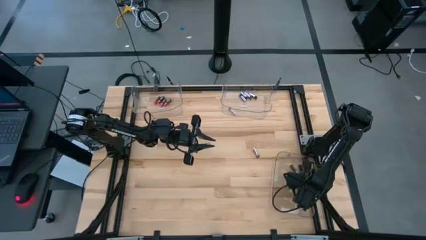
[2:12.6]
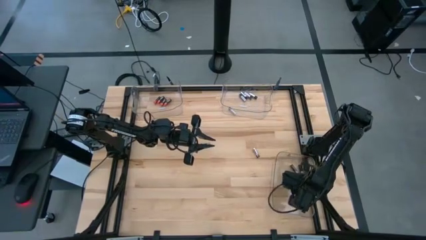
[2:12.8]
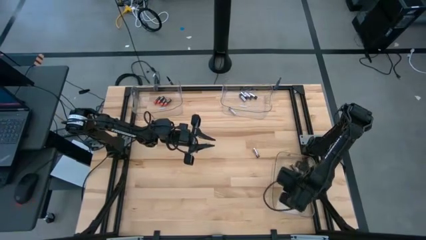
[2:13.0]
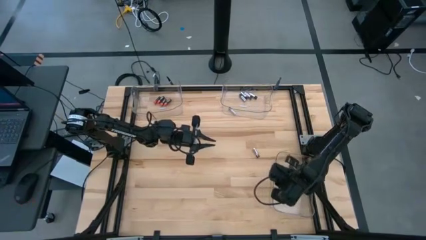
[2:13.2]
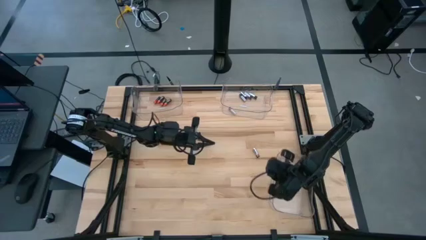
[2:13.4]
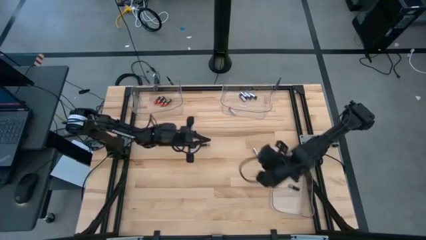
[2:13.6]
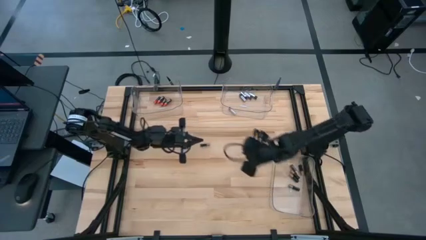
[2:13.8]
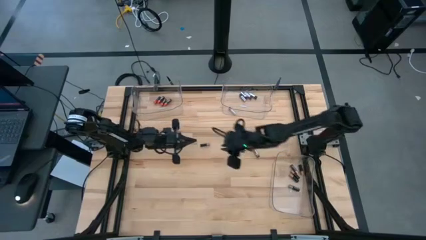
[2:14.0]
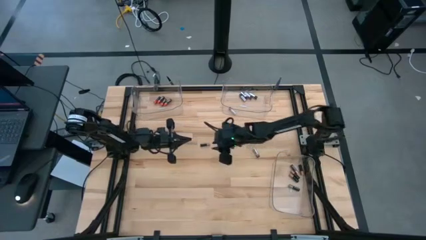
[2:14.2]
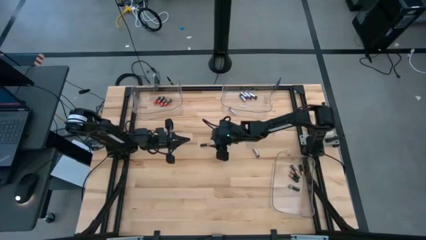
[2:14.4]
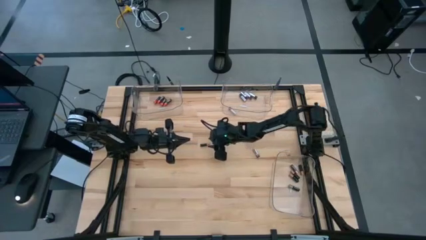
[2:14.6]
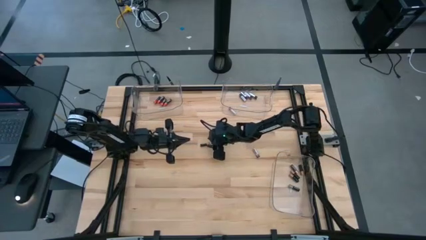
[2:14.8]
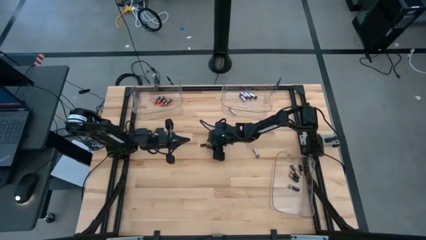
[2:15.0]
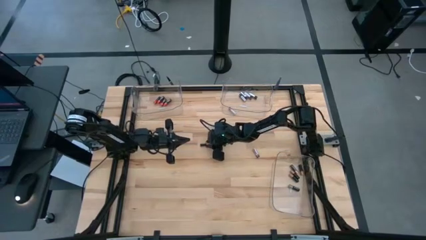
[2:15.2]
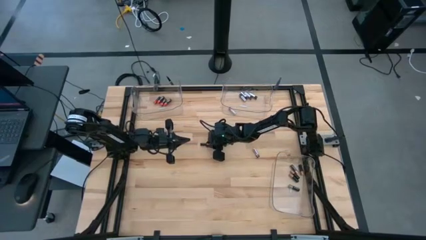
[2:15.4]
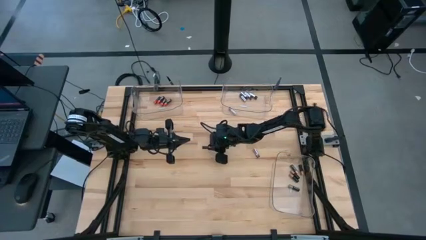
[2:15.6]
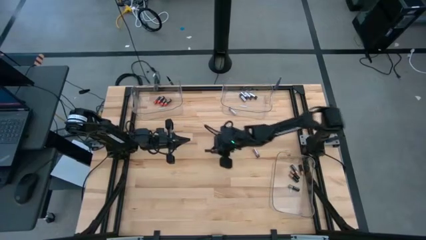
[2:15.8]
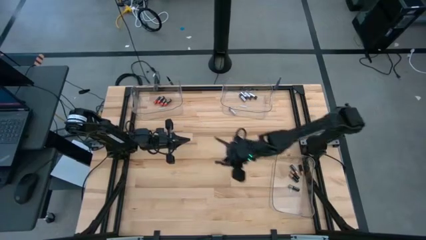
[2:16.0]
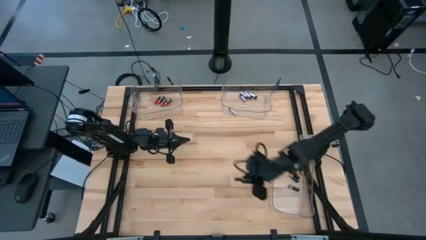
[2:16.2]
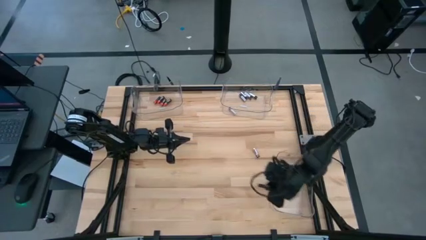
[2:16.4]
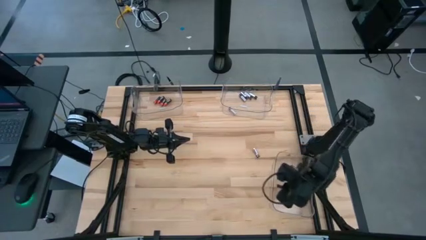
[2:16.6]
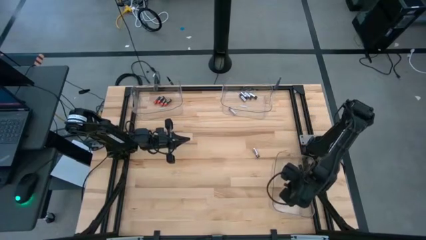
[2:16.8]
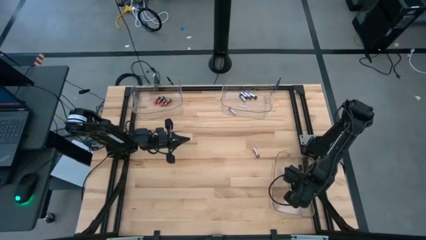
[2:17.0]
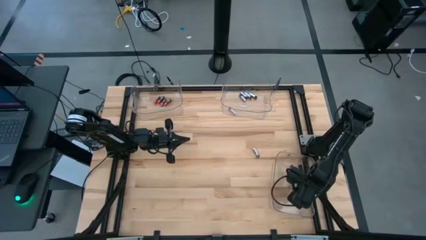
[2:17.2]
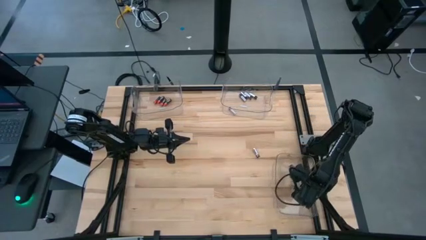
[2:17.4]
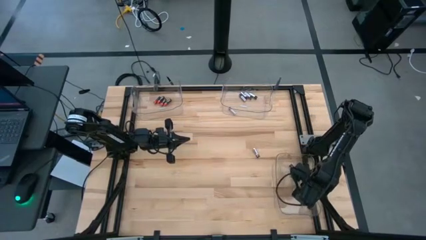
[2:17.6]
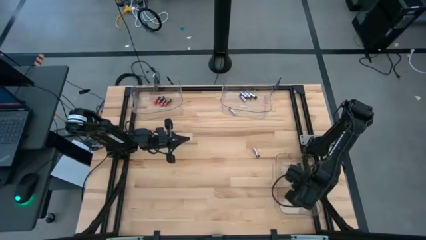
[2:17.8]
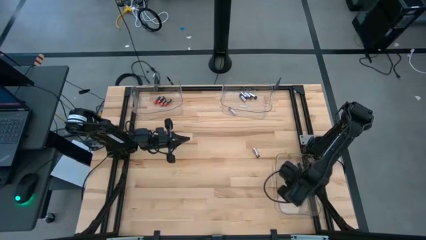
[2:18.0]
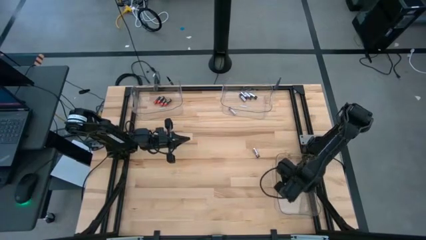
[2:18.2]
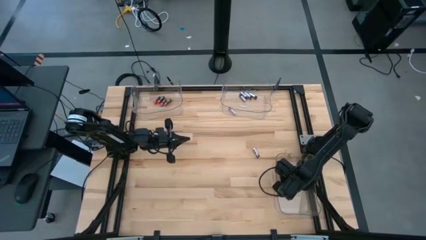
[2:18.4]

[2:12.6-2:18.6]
Task: Sort batteries
Put the brown battery into the bottom right transparent bin

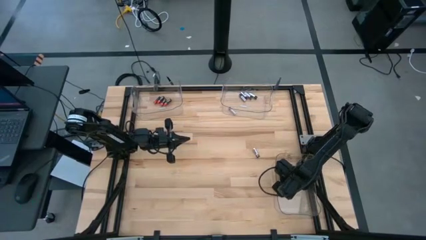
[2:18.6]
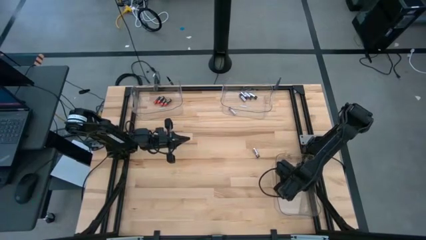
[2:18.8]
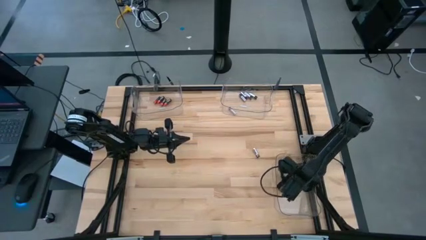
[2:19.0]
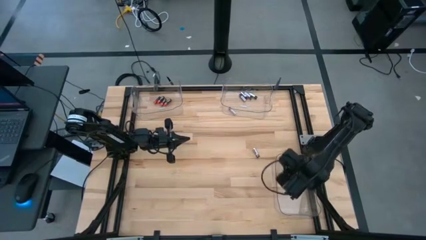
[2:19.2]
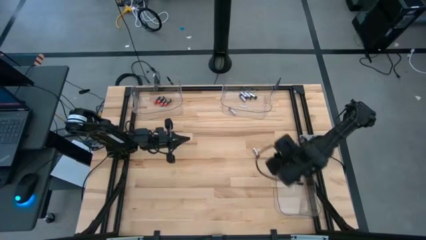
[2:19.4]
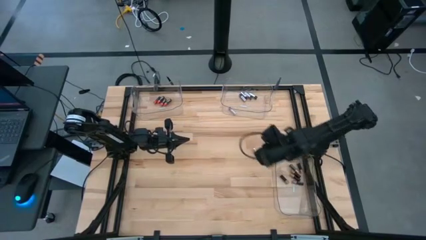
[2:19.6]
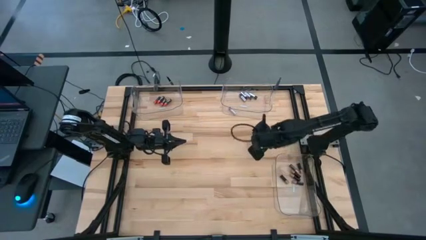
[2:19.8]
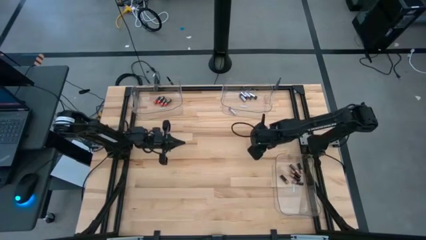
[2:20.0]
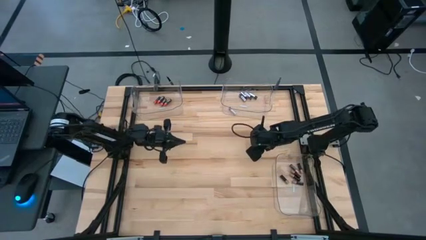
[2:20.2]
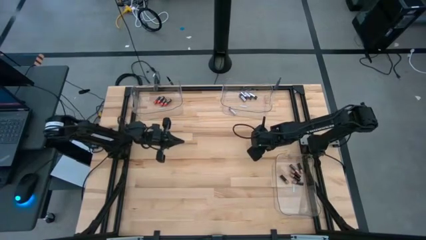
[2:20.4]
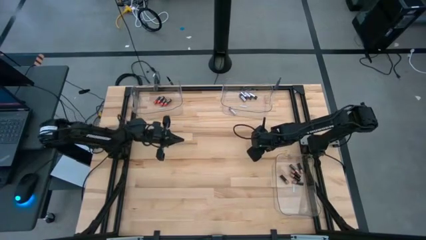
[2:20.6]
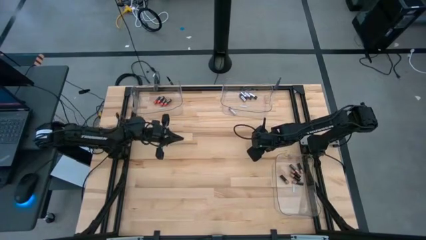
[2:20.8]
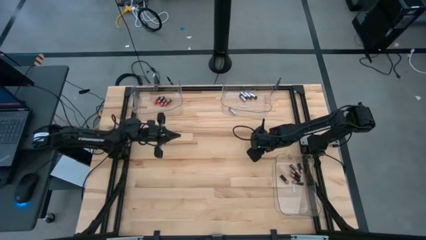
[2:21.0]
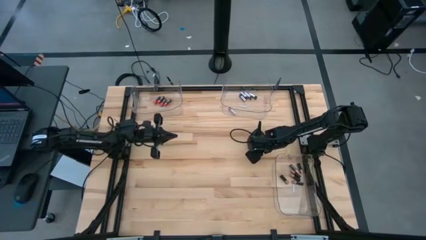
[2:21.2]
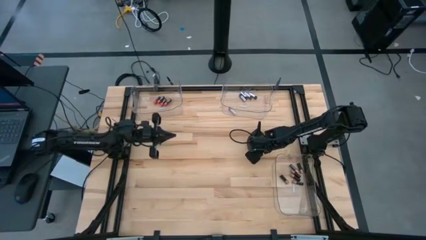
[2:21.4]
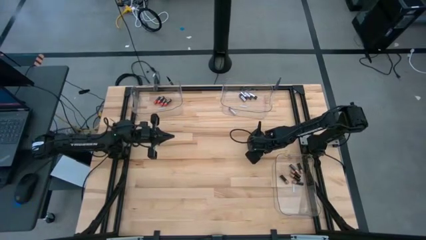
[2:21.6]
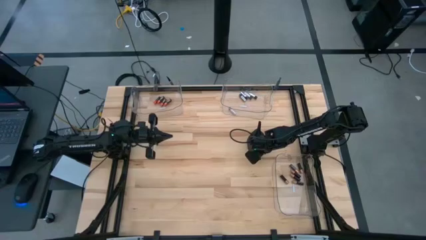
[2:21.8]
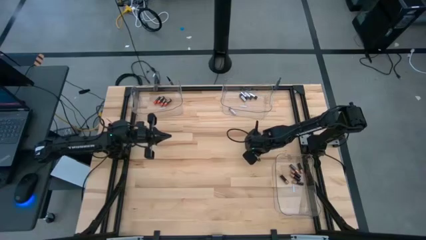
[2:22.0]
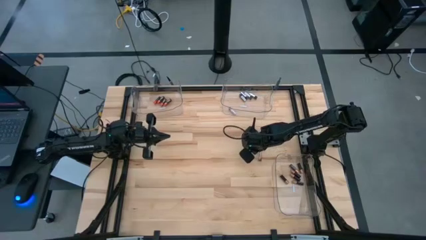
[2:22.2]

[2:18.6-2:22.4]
Put the silver battery into the top right transparent bin

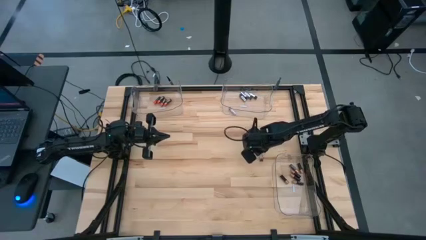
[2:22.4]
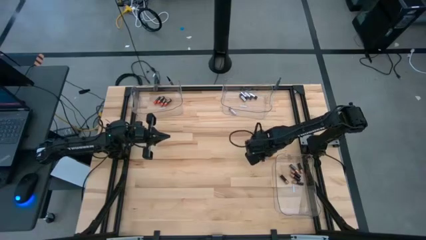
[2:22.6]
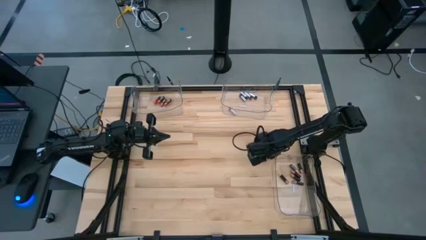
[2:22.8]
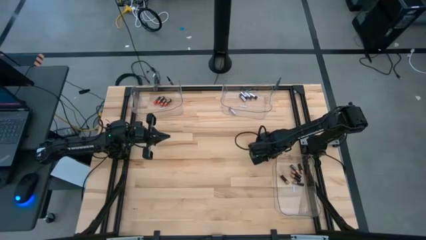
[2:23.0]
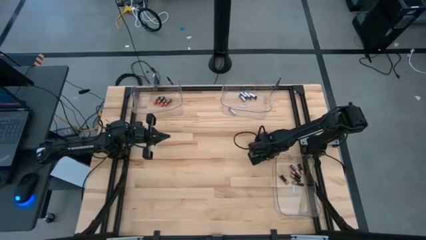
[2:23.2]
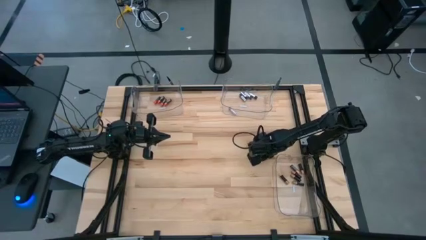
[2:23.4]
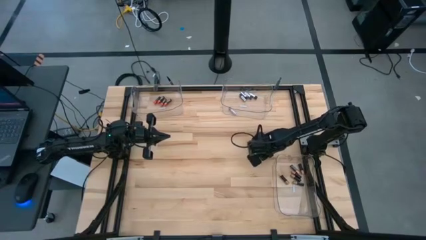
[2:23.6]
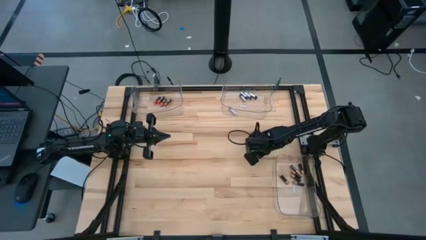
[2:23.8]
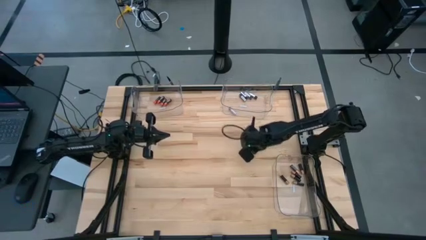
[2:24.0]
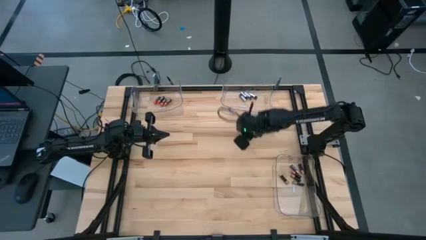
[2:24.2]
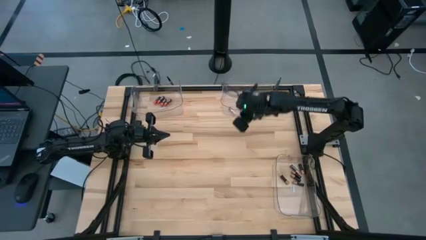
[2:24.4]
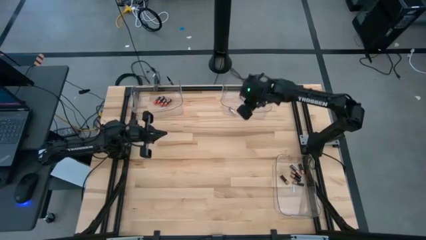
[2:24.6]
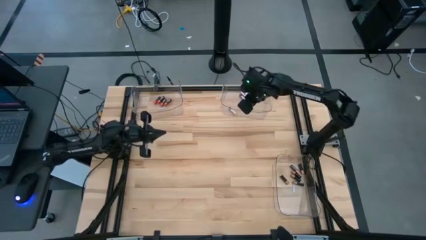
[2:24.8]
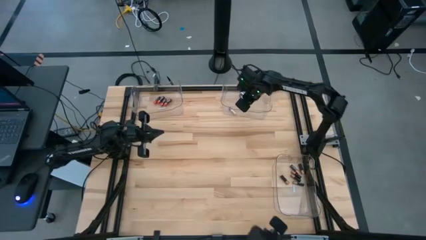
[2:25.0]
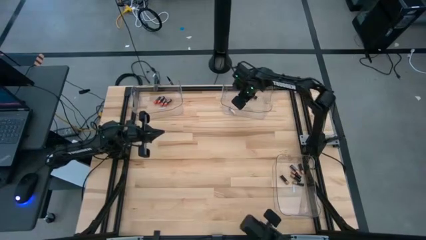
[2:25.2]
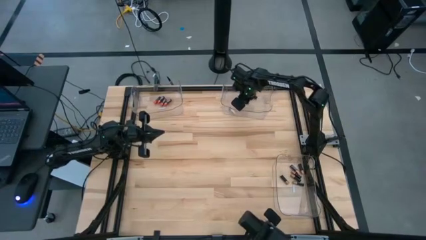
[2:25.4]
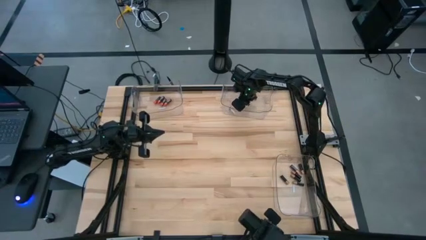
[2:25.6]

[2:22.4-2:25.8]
Put the silver battery into the top right transparent bin

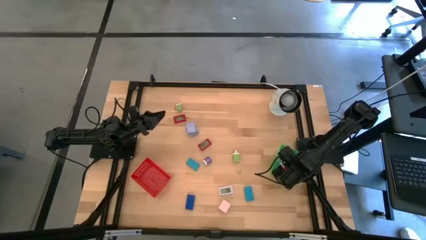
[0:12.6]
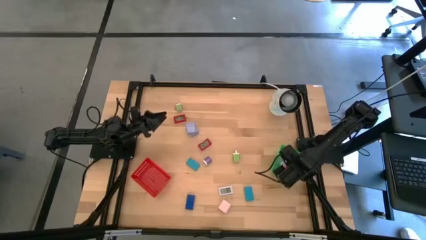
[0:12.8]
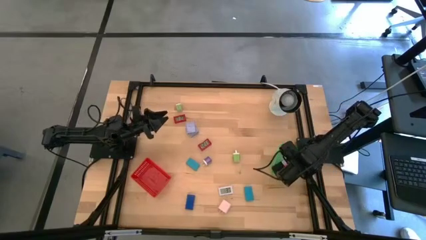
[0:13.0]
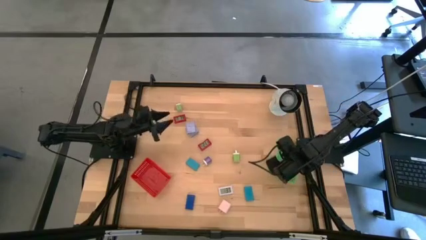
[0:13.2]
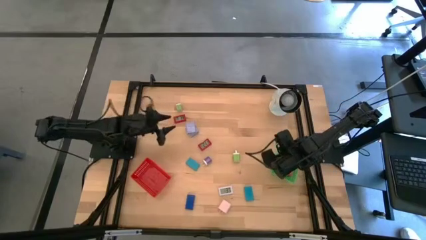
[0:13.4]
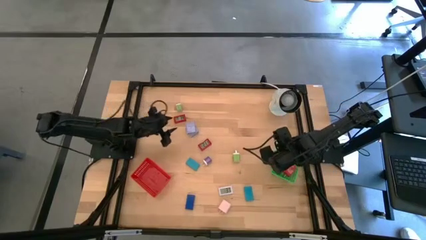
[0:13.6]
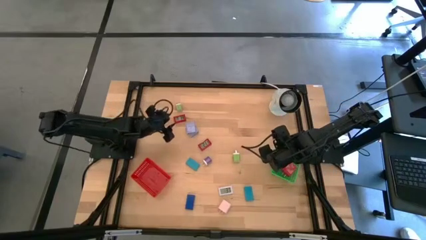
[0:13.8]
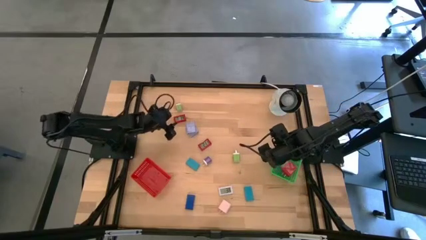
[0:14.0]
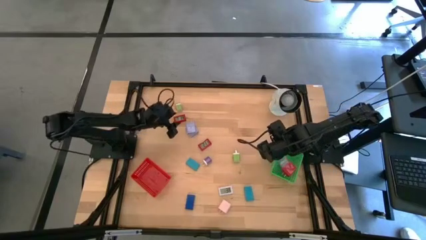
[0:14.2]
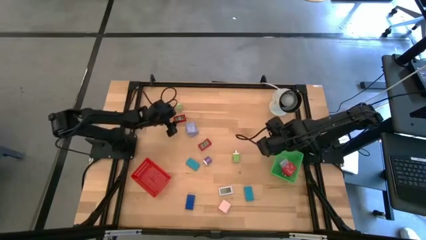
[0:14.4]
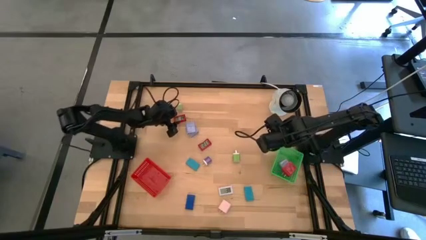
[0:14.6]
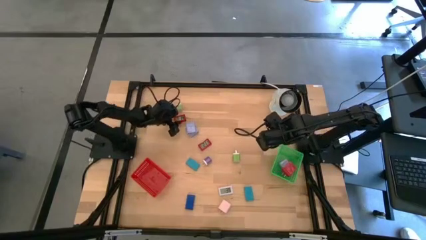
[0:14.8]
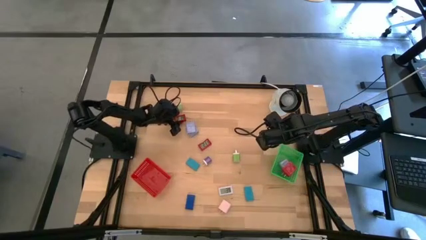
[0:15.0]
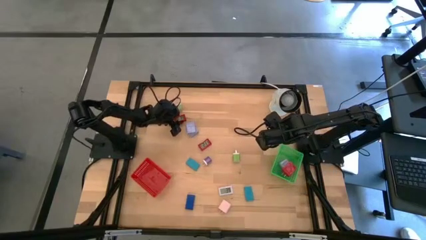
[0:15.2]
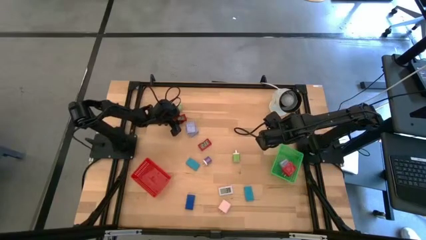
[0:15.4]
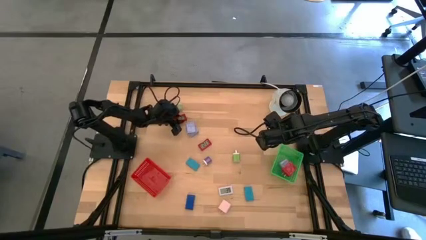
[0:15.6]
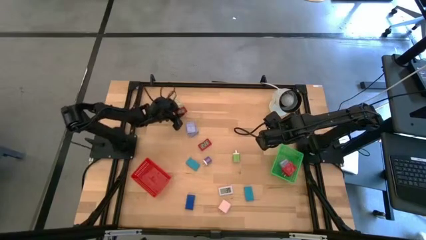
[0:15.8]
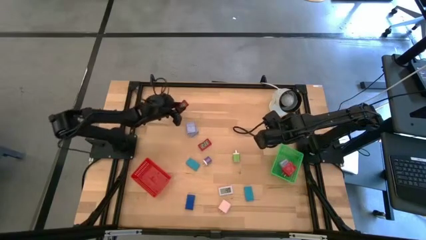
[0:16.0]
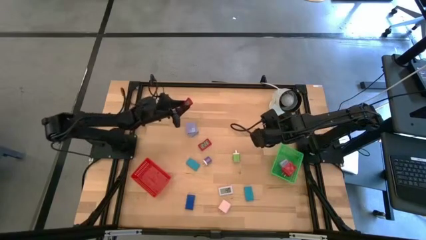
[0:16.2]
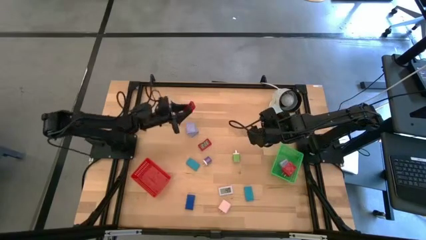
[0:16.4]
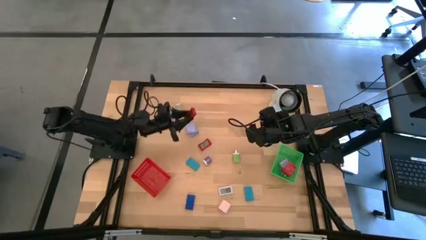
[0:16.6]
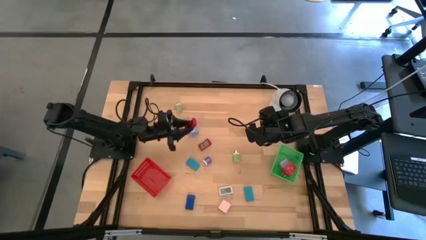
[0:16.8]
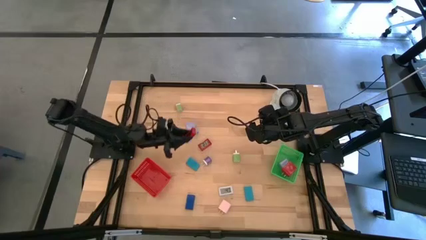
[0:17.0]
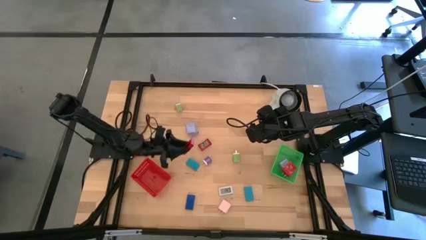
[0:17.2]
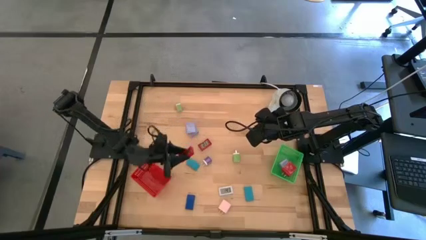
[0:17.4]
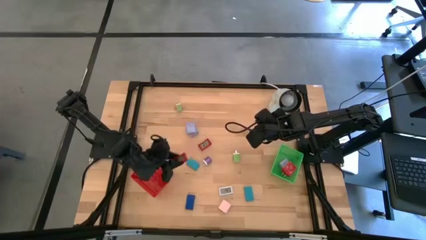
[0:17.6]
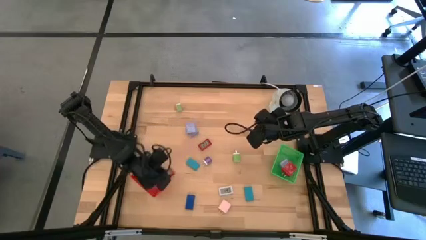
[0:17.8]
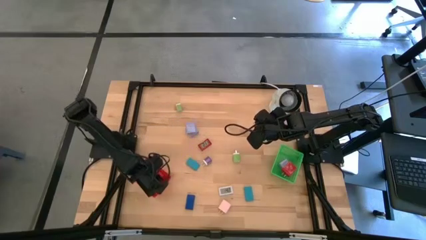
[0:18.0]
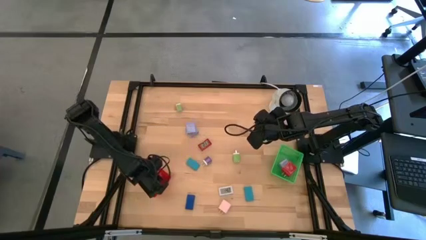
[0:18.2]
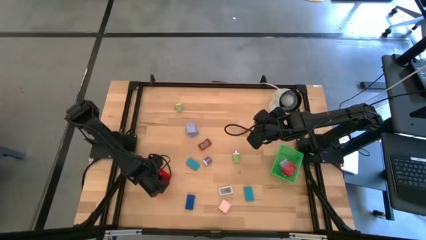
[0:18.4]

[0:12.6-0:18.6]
Task: Pick & Place Office items
Put the top red digital clock into the red bin
